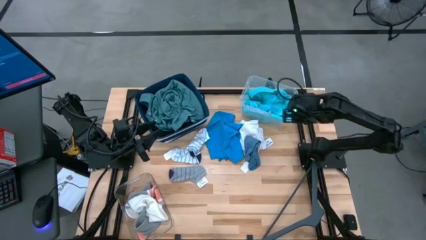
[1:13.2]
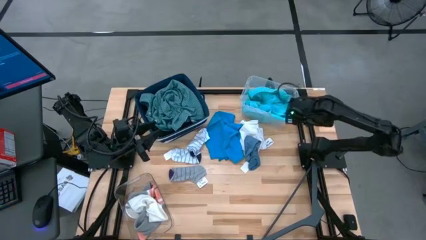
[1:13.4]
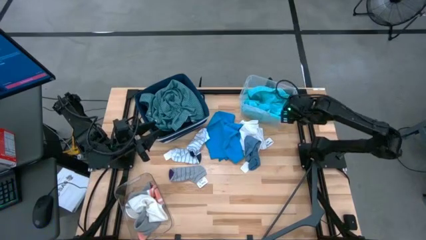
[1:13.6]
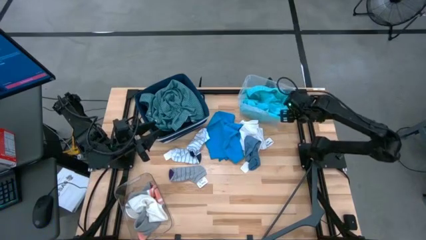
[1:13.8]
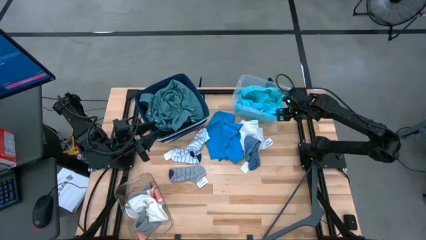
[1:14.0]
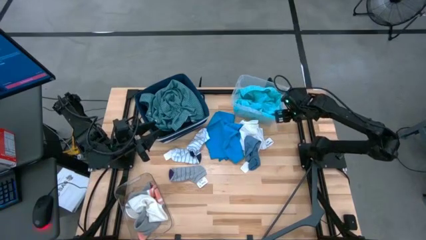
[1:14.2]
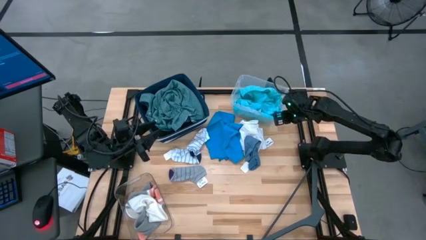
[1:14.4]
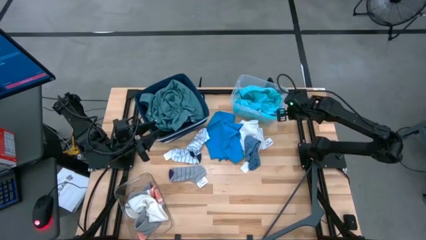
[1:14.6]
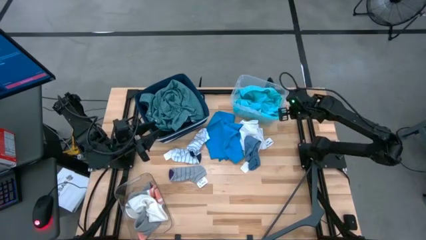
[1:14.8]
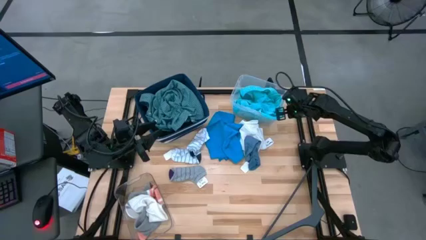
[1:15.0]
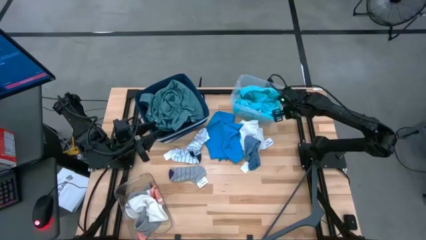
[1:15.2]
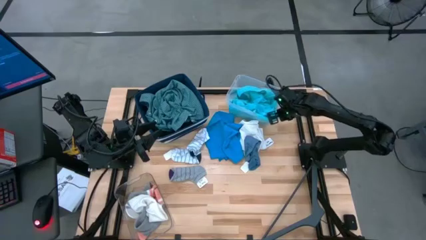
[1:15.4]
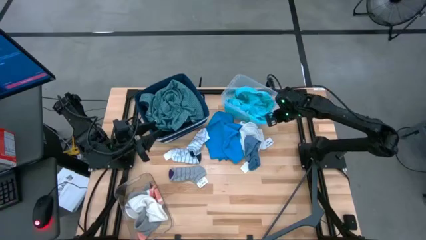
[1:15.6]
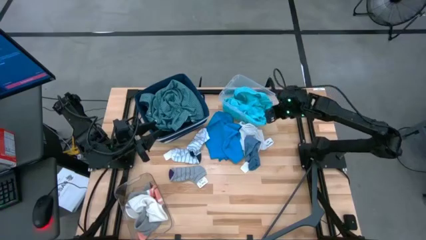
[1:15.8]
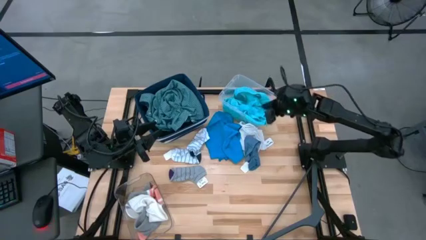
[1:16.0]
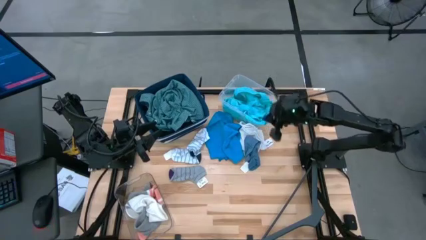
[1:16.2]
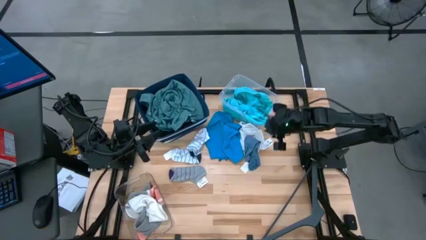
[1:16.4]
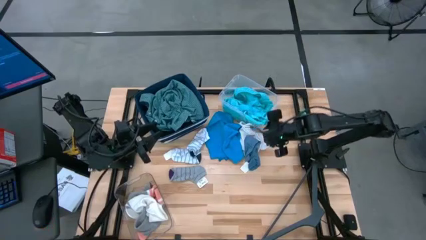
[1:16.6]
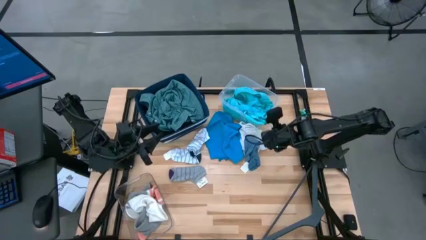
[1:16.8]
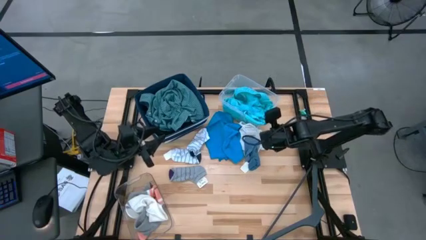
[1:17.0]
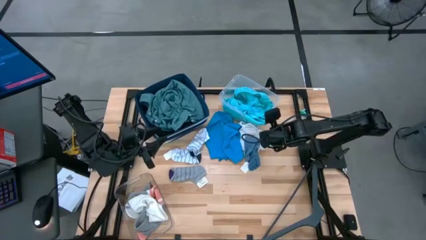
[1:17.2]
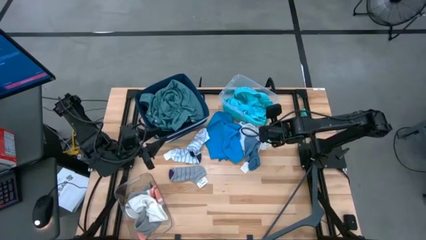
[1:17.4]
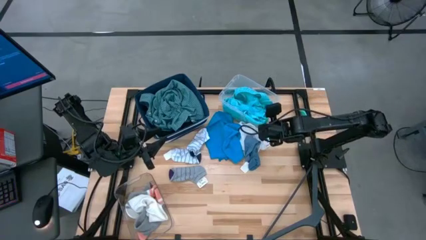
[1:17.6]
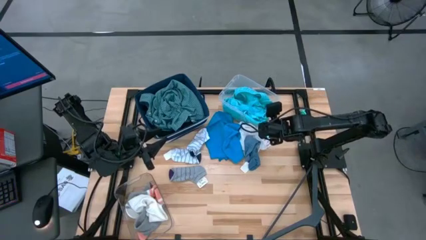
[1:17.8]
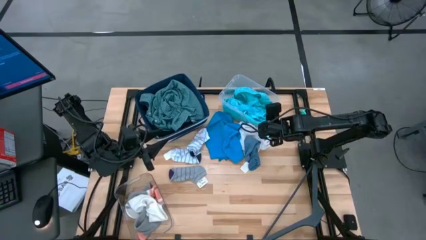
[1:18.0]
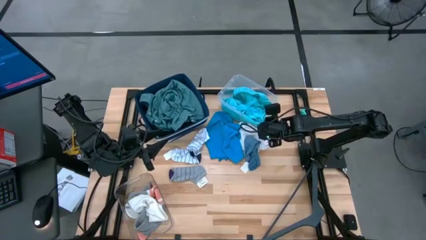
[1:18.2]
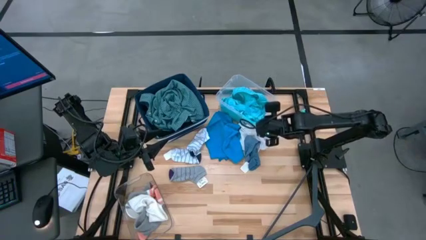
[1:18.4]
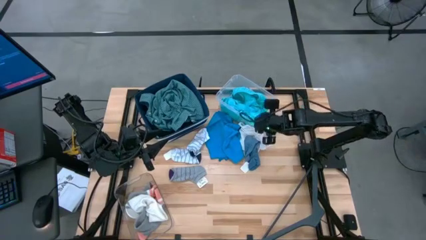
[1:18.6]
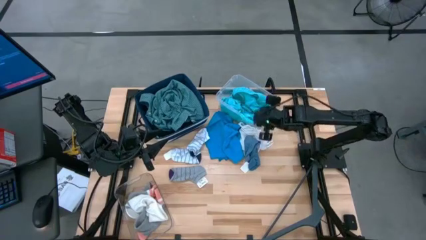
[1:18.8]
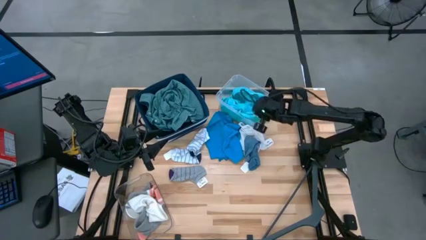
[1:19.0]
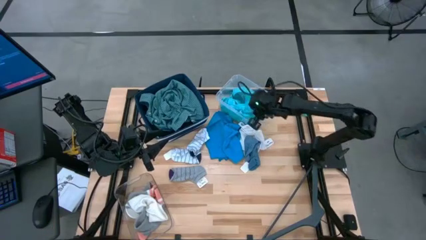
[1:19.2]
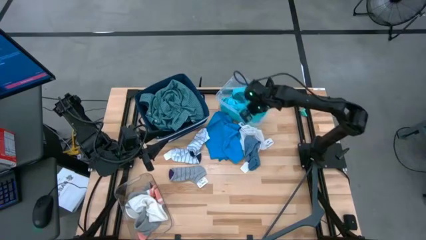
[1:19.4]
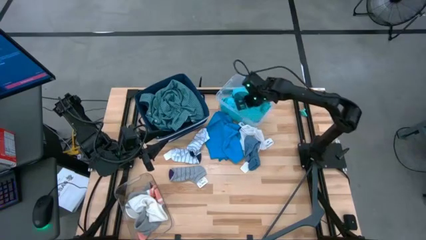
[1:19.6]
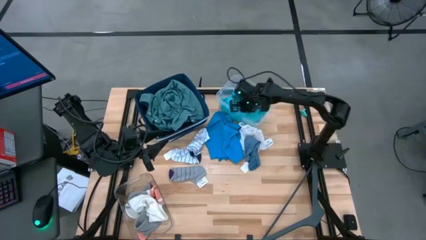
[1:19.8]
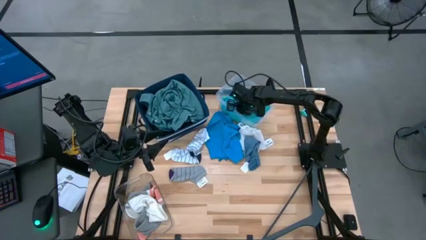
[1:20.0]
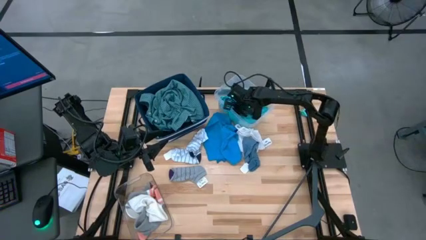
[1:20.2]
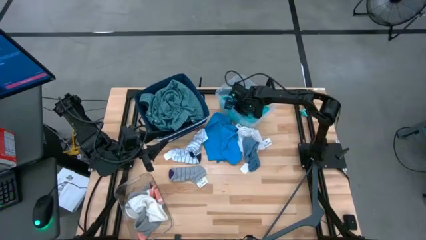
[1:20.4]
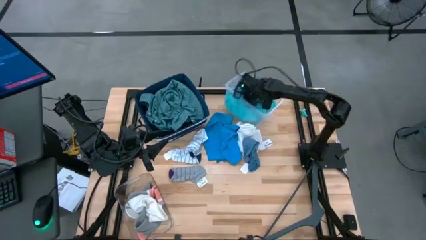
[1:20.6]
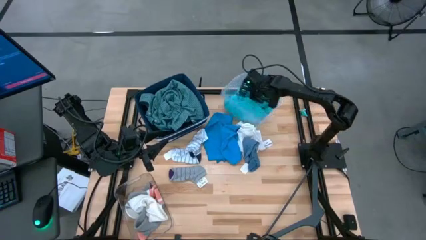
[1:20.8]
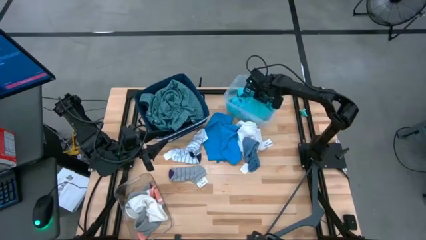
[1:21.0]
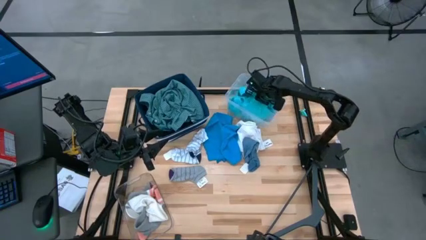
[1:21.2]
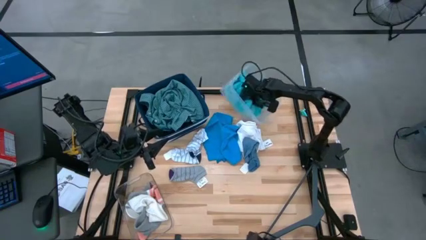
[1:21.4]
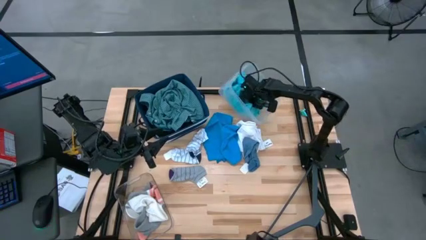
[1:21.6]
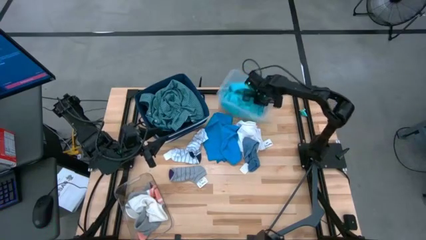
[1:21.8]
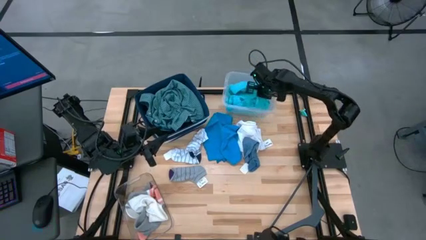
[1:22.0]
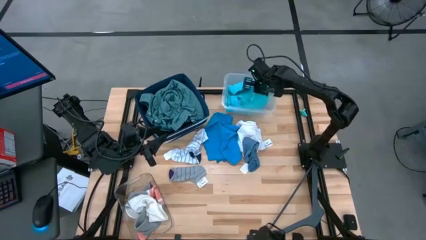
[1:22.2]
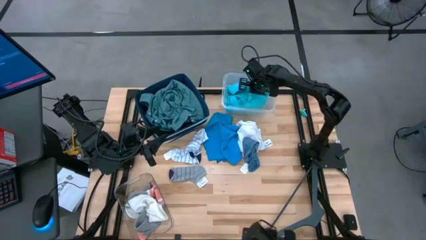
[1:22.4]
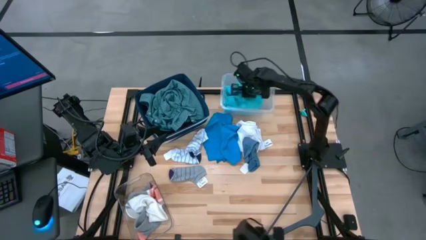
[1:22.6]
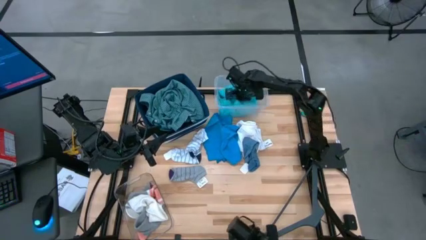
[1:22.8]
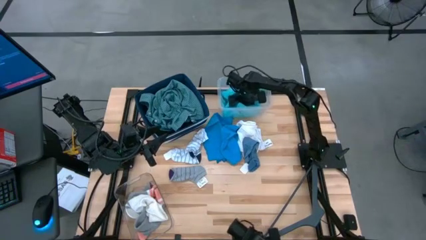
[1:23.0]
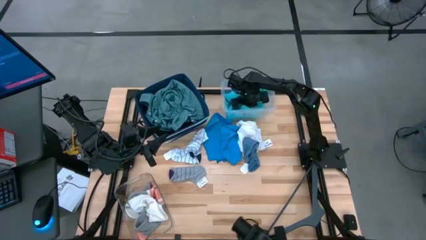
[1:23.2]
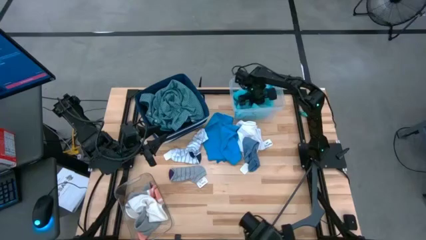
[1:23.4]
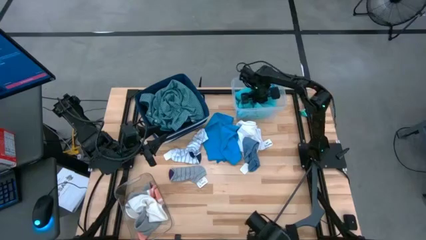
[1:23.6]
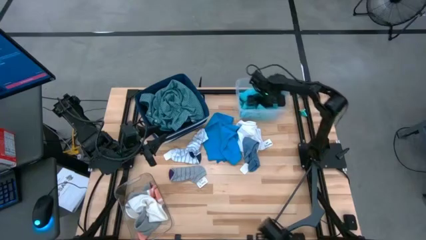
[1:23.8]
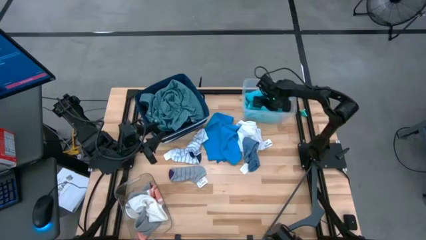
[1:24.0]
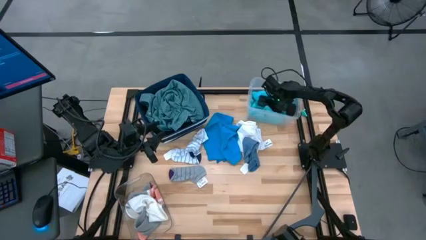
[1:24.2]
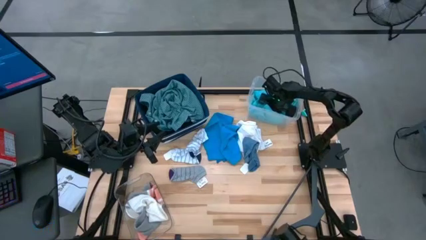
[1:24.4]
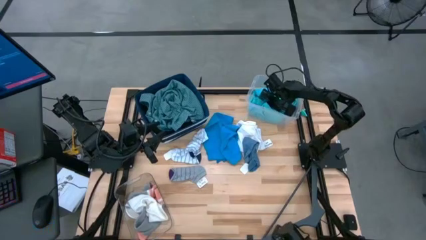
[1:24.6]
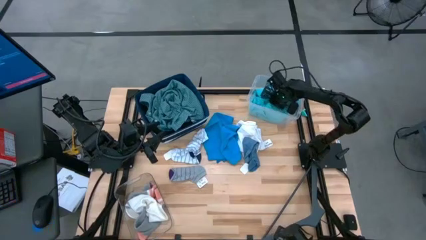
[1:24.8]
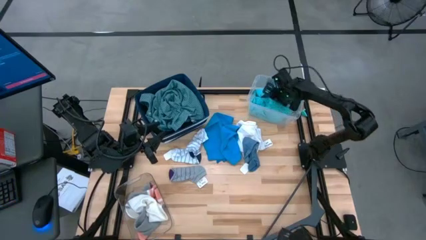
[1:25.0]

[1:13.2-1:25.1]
Task: Pick & Place Cloths
Put the light blue shorts into the white bin

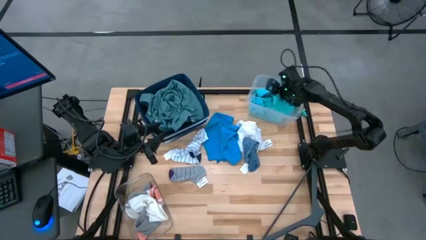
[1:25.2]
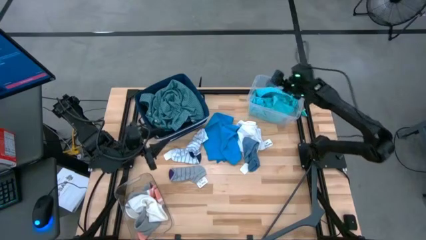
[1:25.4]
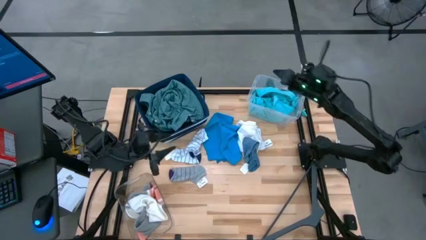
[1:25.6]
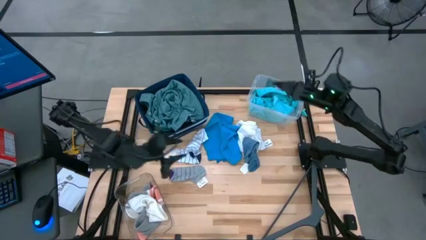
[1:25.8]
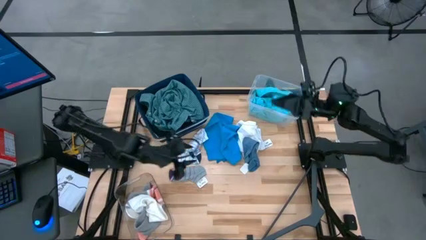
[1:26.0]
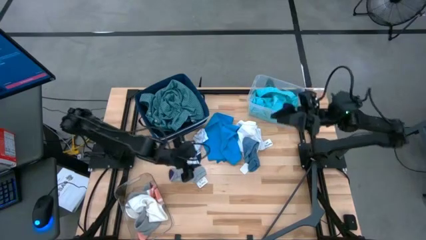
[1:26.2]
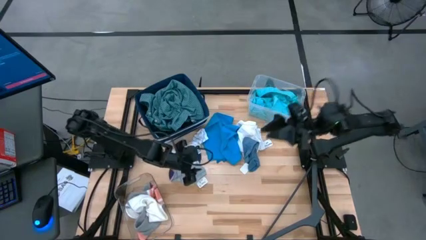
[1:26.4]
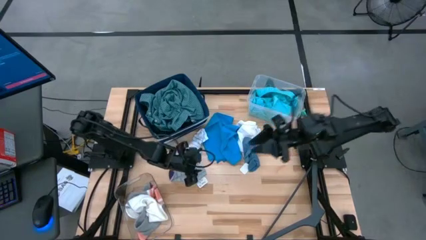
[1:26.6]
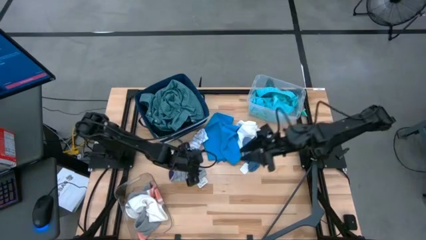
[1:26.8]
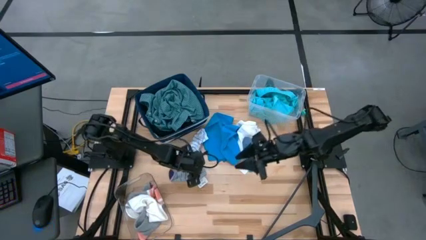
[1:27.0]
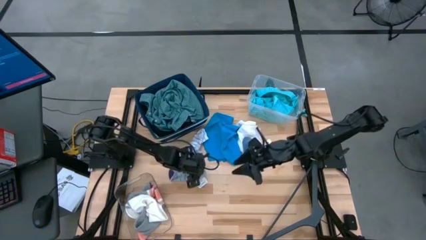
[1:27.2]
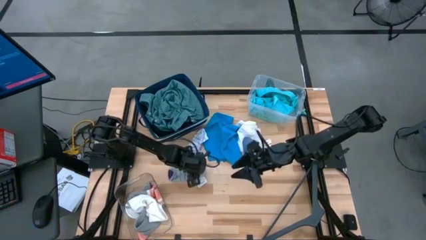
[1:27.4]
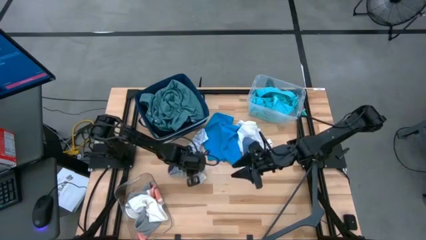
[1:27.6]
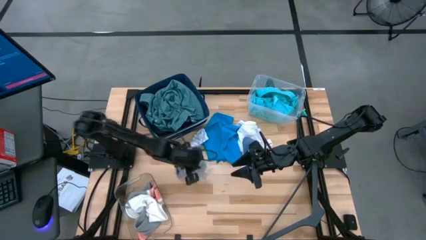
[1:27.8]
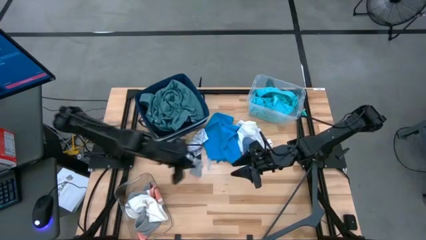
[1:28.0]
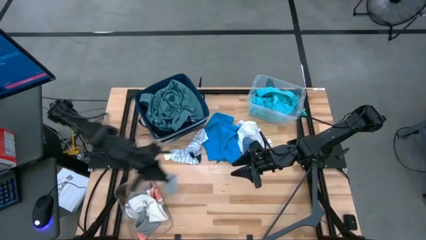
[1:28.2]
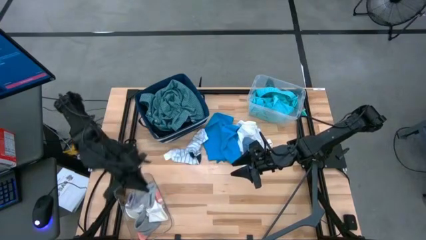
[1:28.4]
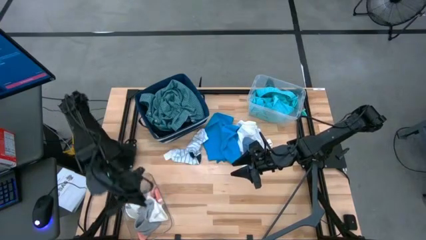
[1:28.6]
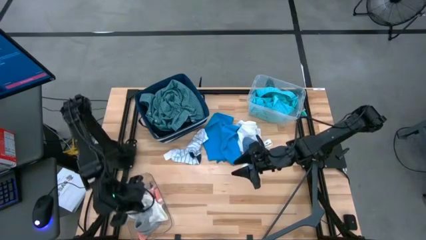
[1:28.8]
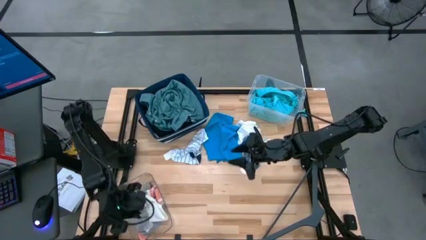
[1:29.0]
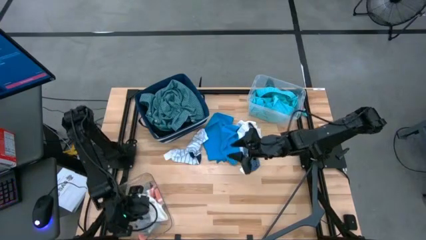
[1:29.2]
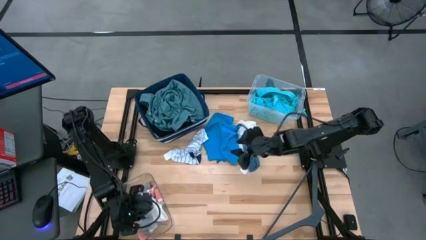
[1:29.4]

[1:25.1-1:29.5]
Put the gray striped sock into the transparent bin
